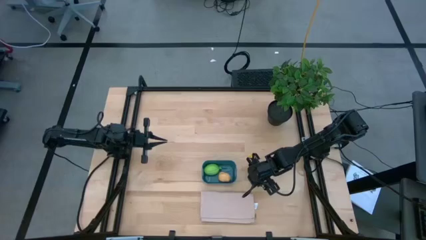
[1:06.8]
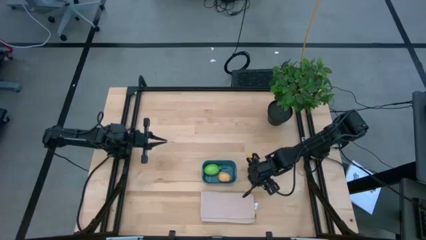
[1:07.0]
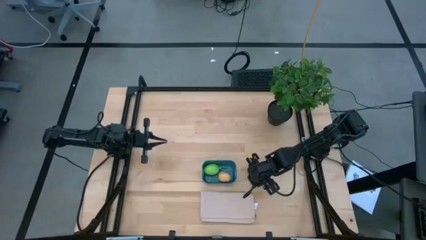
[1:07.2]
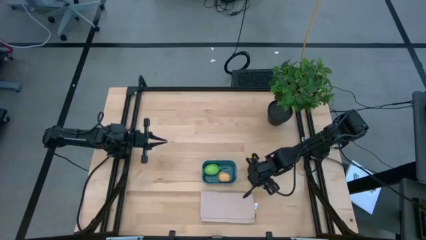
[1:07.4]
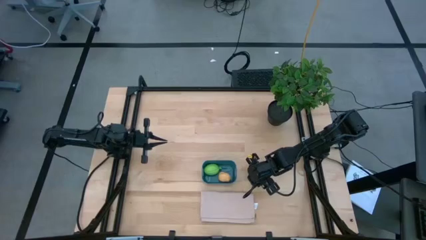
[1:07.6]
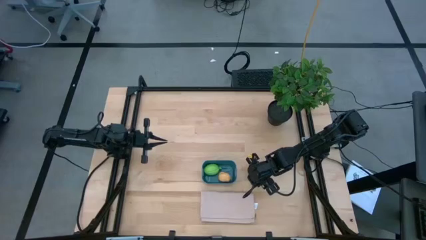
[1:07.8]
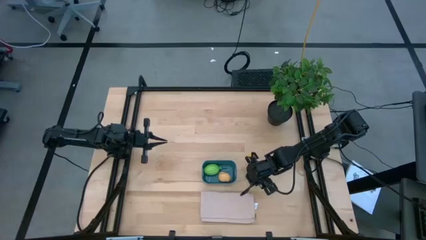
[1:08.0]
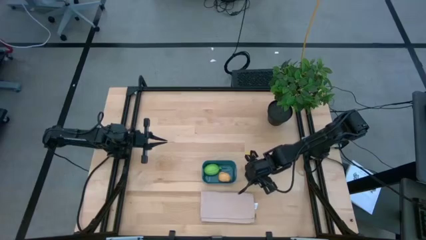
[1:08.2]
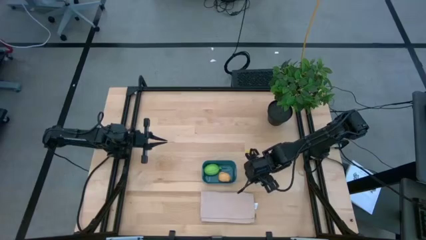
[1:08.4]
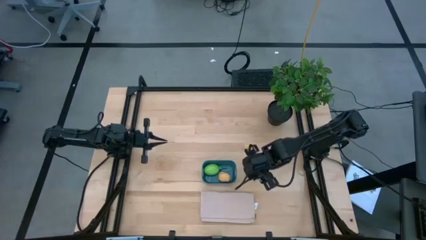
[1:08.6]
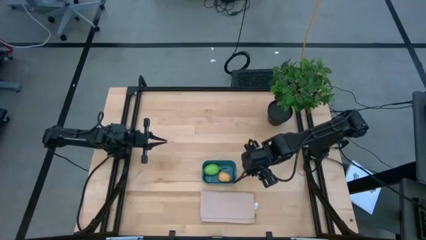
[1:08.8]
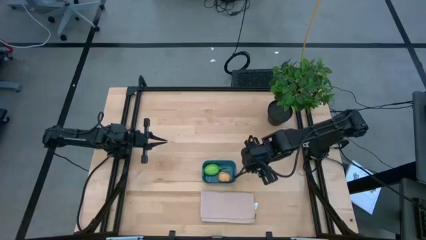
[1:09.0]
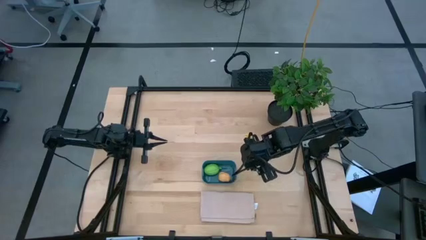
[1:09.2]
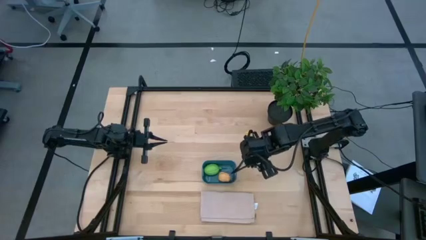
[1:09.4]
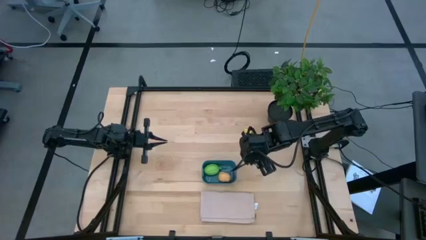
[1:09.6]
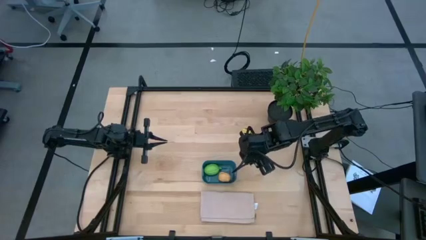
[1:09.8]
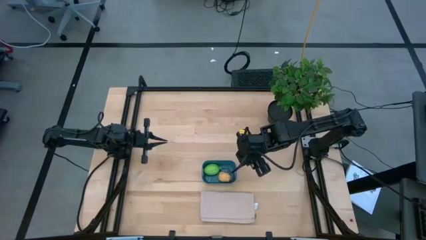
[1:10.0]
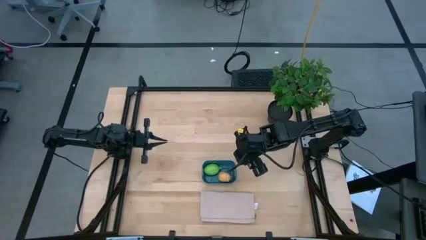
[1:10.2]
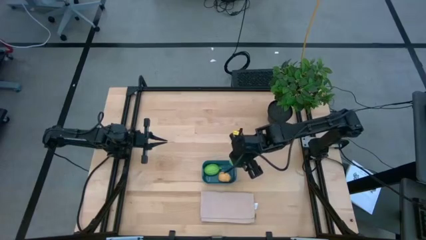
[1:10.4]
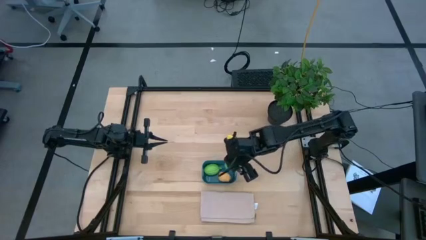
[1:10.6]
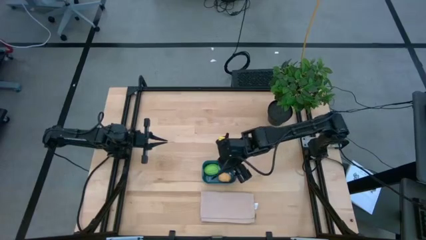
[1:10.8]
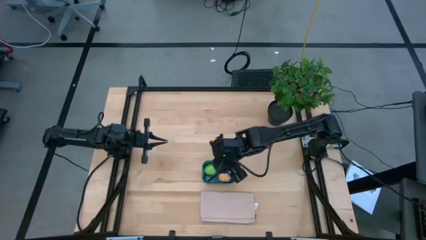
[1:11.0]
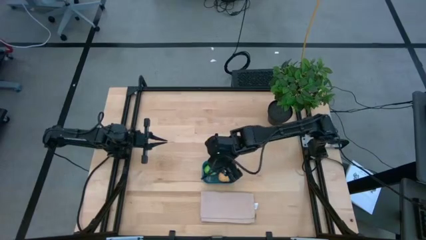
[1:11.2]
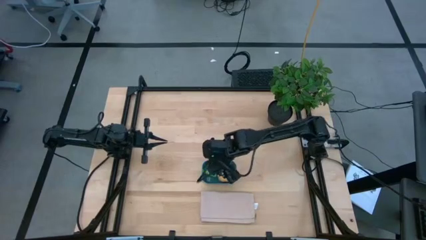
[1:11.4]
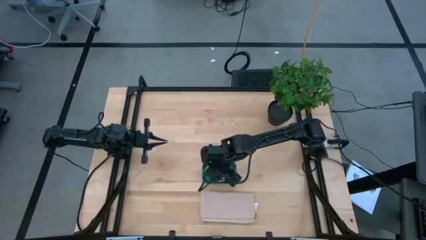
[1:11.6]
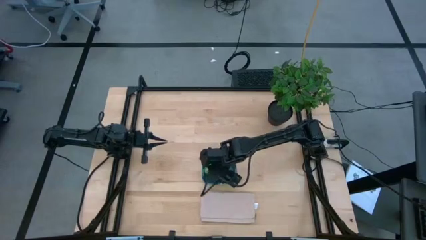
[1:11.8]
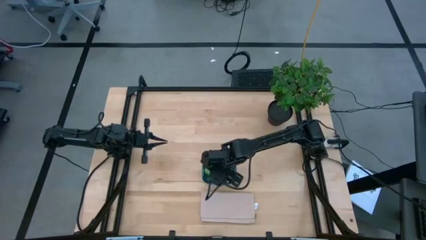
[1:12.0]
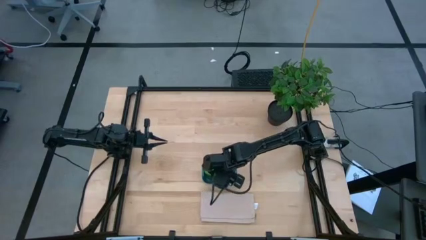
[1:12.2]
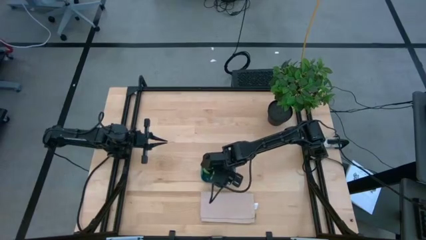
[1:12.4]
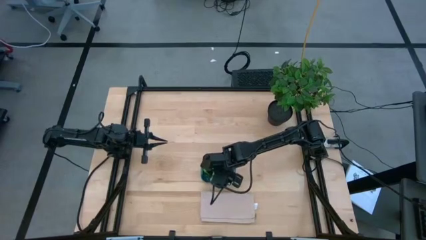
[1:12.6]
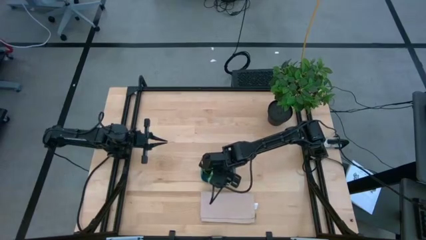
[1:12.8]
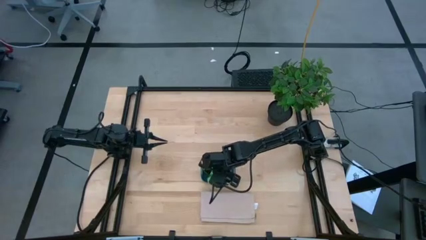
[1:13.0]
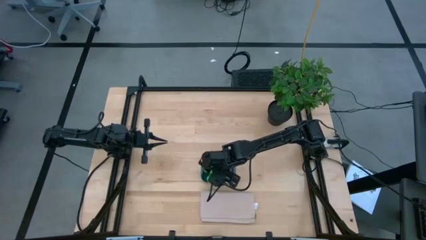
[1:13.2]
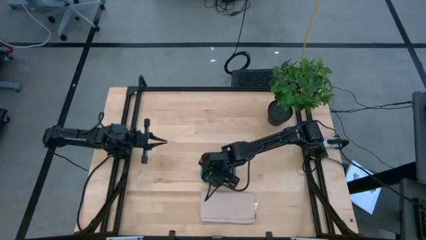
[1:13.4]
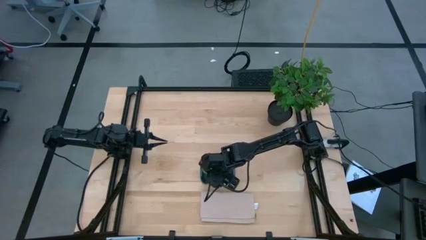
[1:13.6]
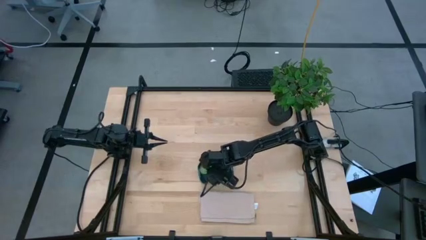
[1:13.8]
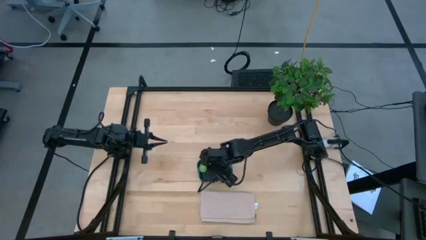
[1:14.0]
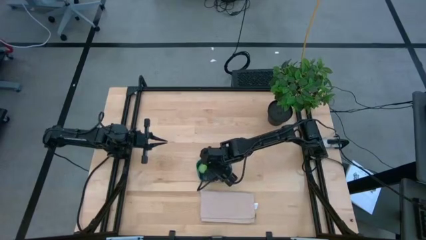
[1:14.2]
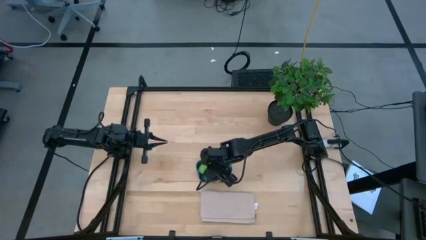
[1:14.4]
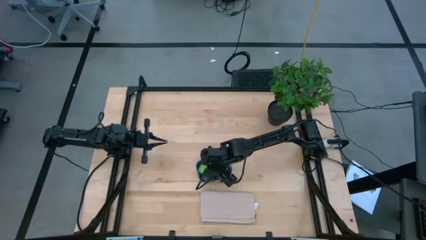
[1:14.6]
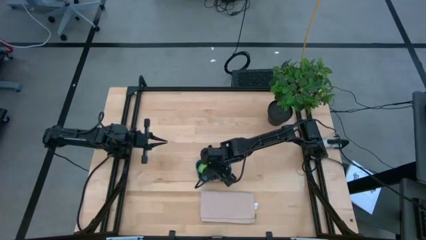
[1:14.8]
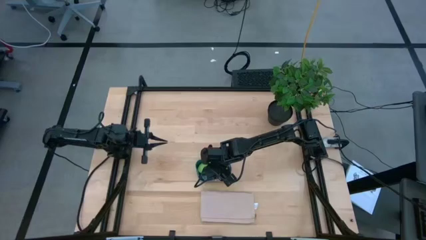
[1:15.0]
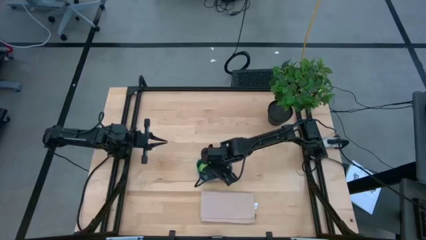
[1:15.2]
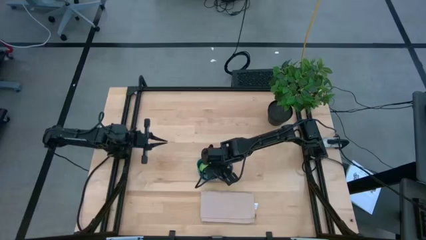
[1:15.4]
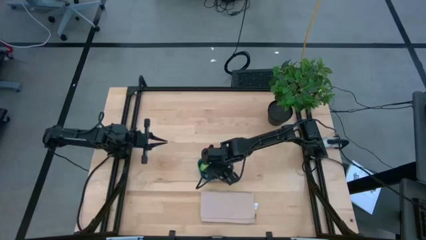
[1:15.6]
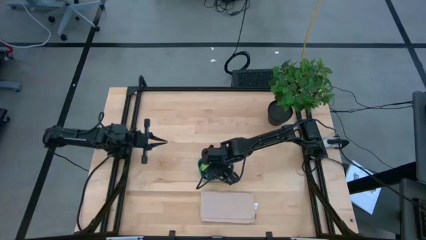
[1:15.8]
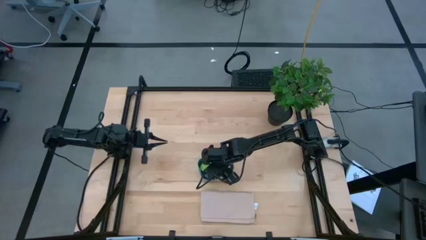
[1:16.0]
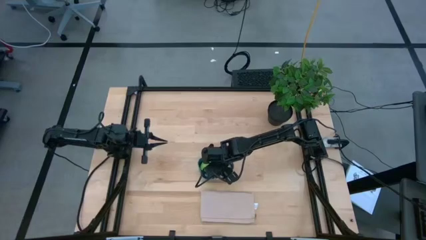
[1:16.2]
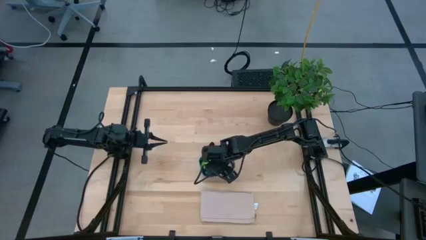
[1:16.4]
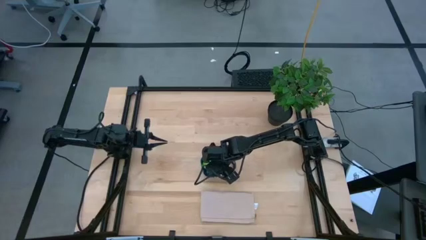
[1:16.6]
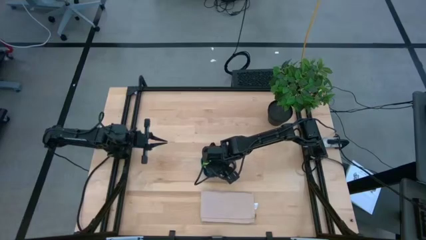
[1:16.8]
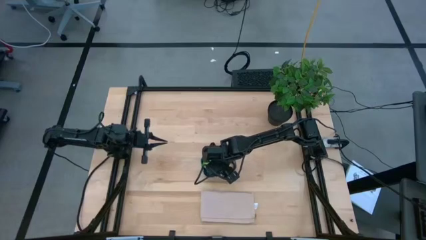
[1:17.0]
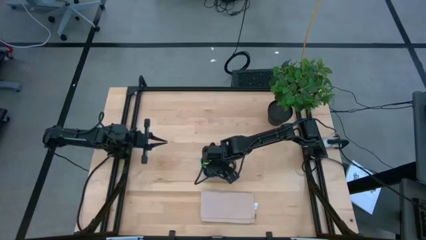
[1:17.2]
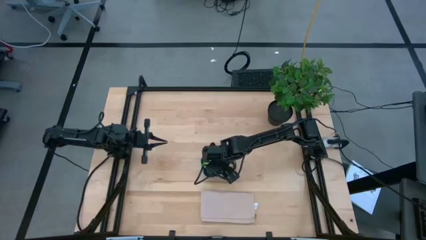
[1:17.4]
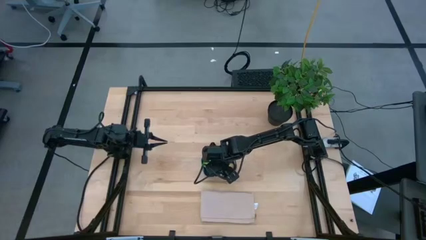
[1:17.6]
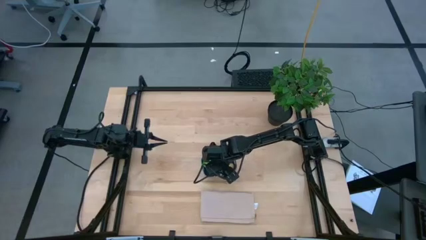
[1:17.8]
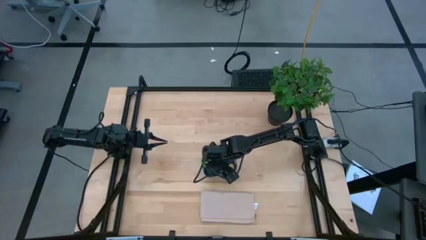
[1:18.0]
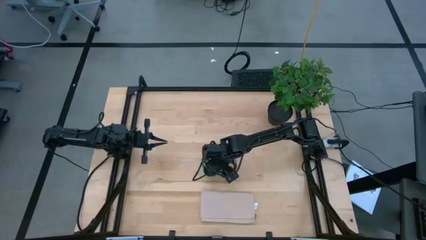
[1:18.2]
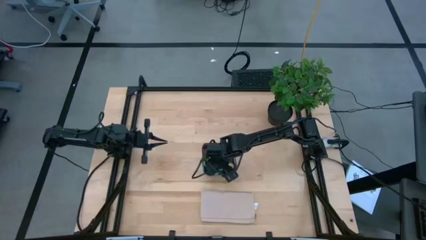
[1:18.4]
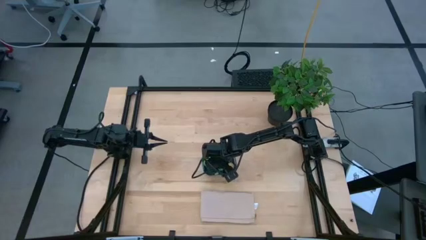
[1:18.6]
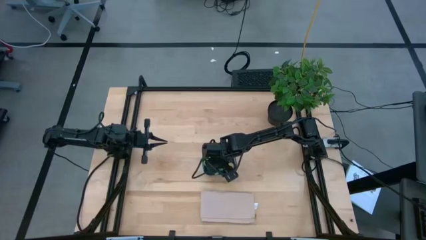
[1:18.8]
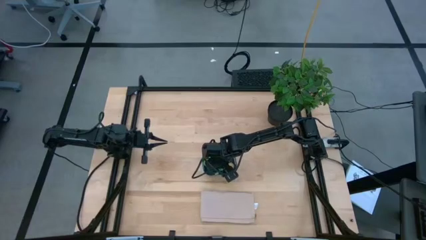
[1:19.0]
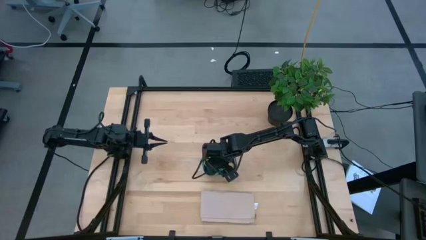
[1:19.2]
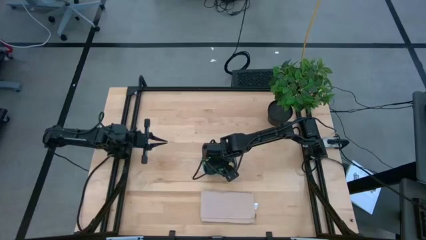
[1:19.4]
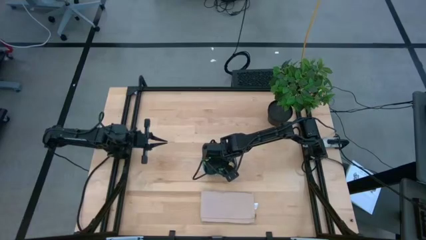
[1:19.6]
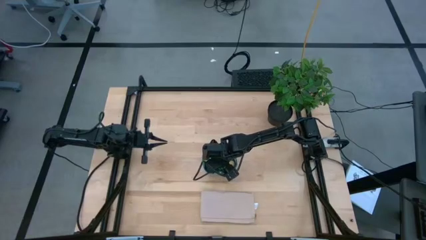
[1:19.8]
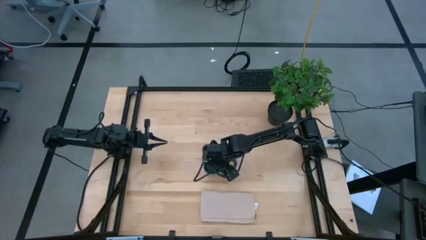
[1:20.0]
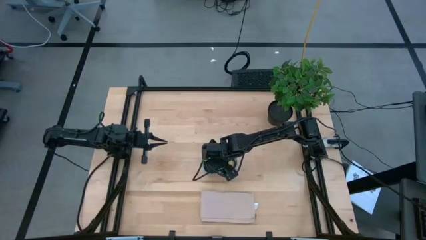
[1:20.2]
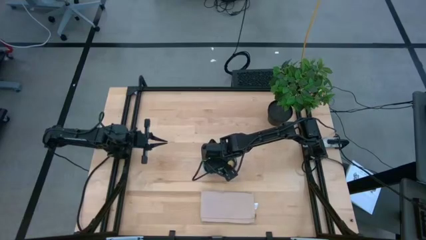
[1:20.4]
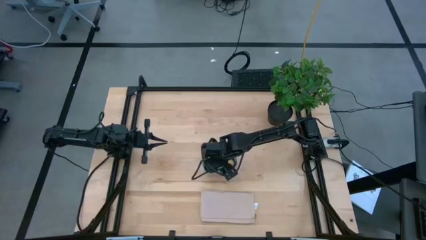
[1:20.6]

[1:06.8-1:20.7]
Task: Pick and placing Produce into tupperware
Put the green avocado into the dark blue bin

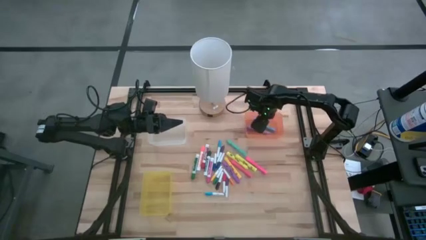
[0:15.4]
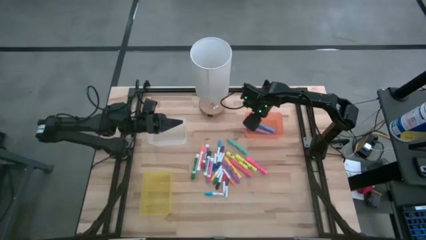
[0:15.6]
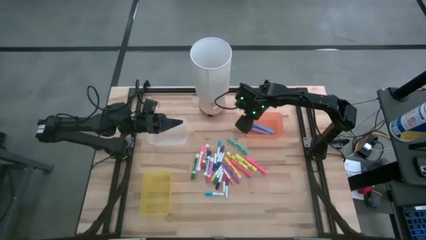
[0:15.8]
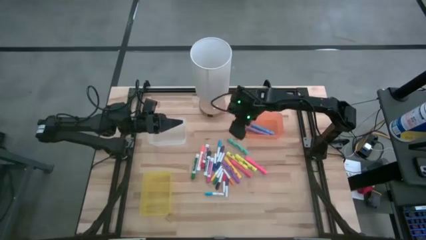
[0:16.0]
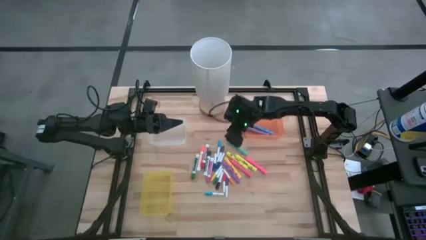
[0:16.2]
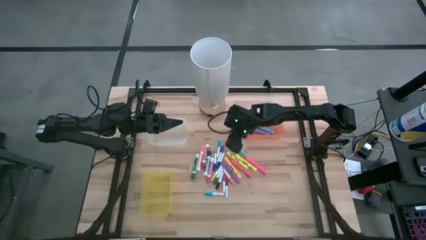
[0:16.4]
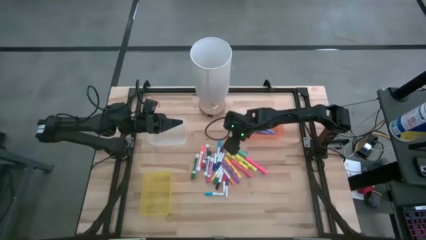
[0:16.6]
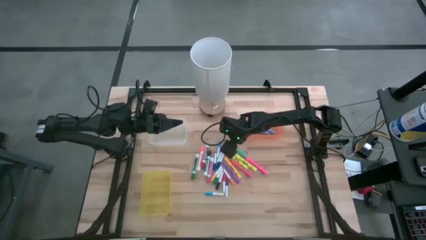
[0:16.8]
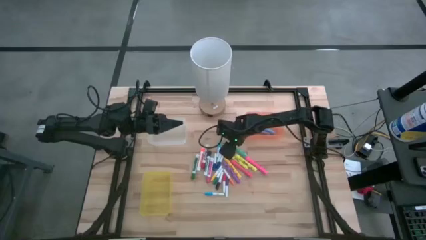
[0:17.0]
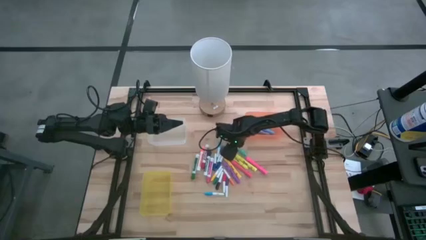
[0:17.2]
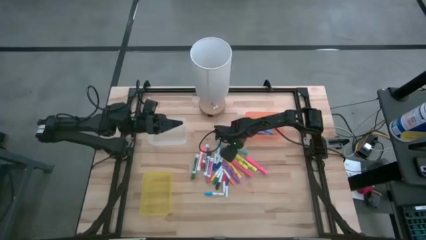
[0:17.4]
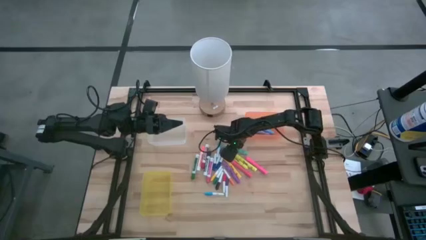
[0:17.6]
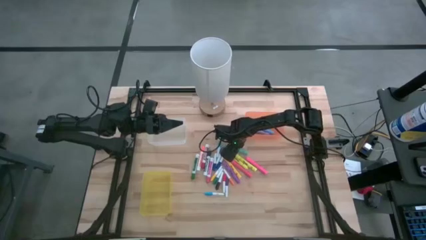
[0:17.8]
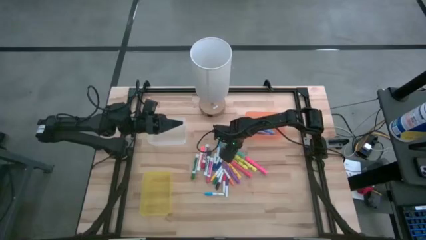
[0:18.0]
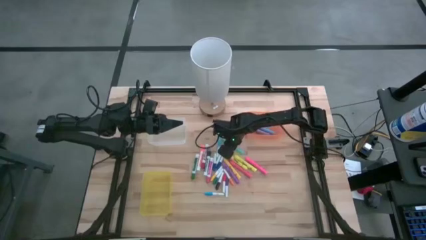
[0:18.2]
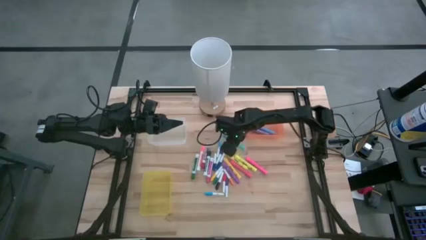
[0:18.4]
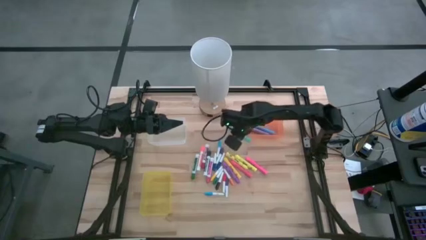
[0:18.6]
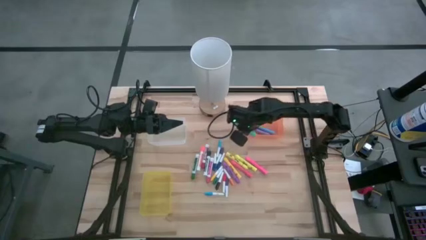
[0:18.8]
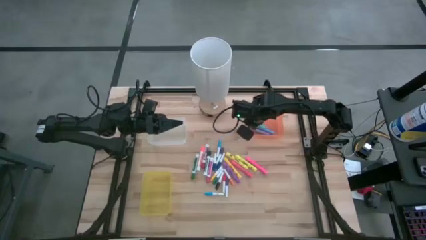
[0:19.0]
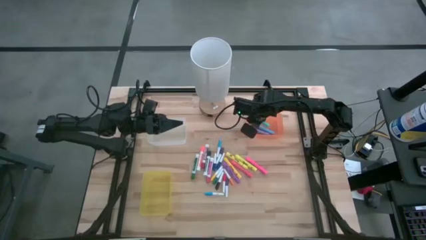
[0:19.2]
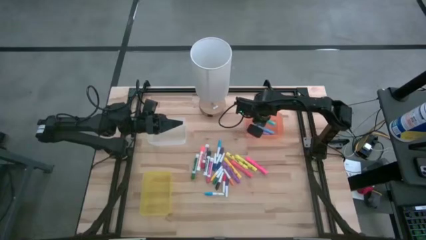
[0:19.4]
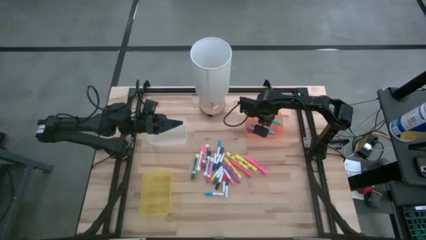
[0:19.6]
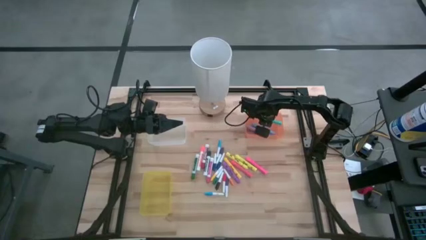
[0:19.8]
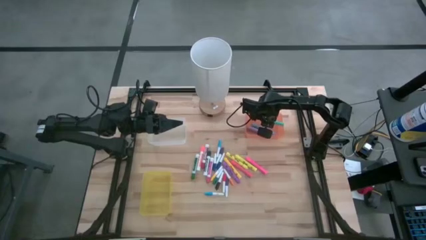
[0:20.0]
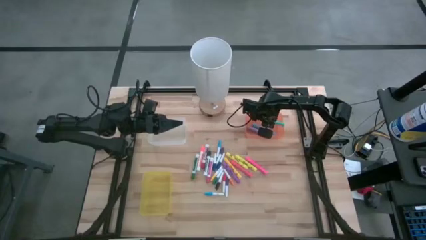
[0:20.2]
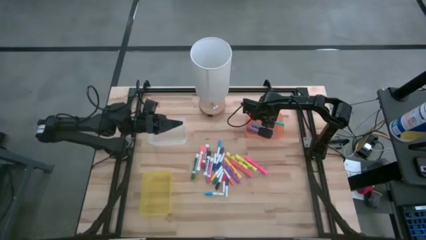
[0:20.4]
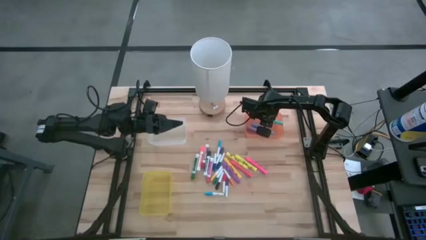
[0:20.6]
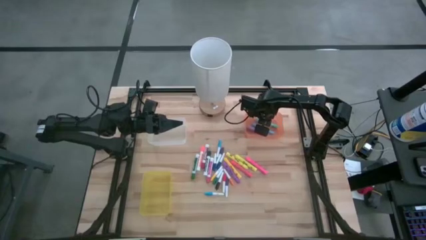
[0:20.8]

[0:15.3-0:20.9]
Task: Pick & Place Markers
Put the light blue highlighter pen into the orange bin
